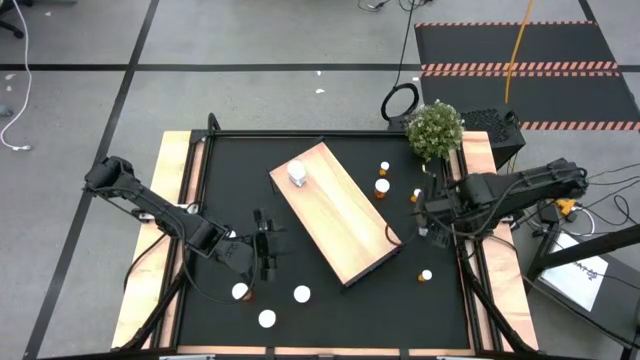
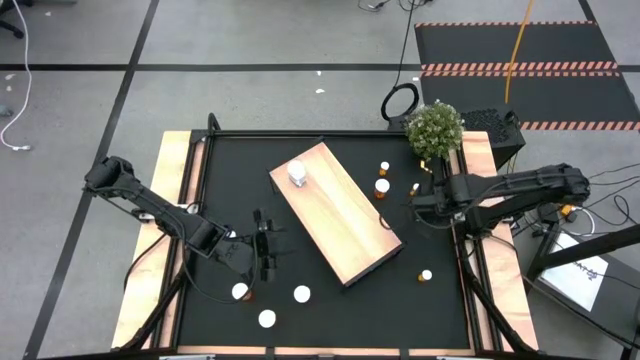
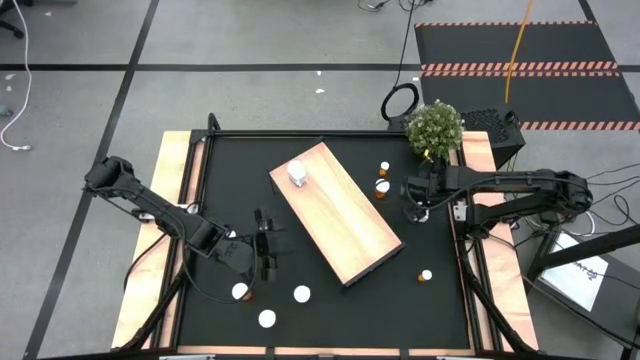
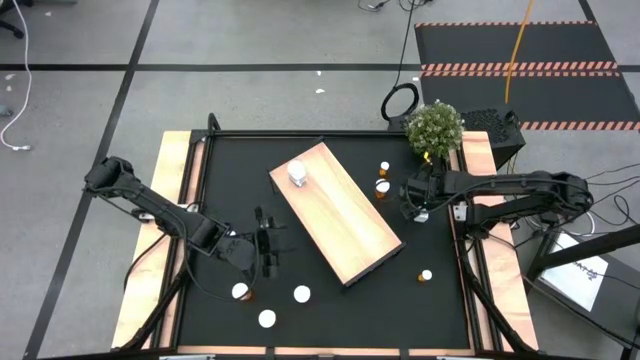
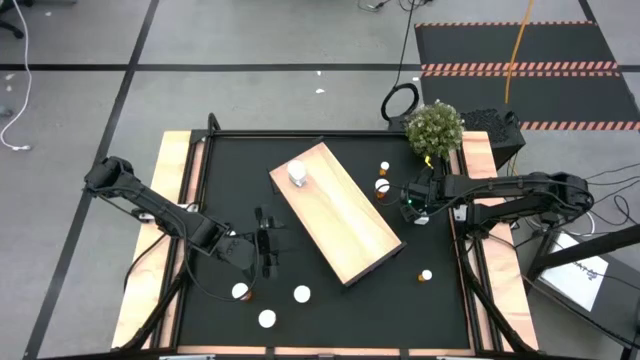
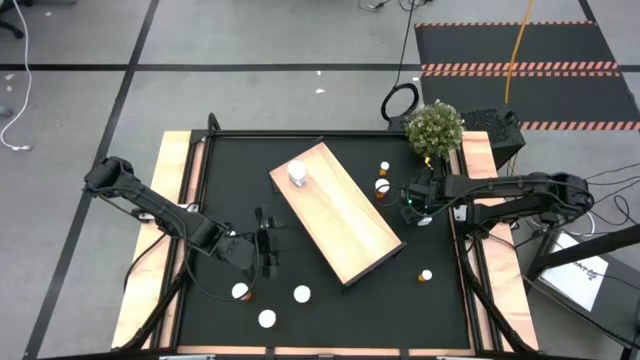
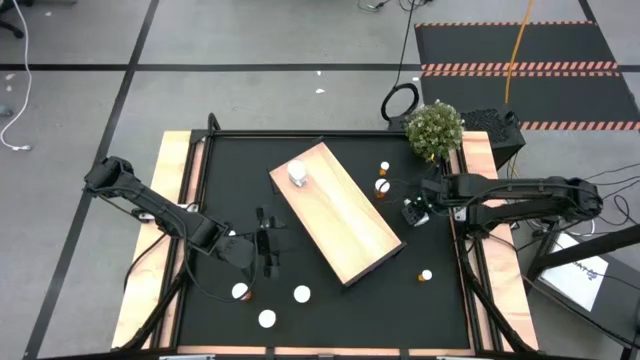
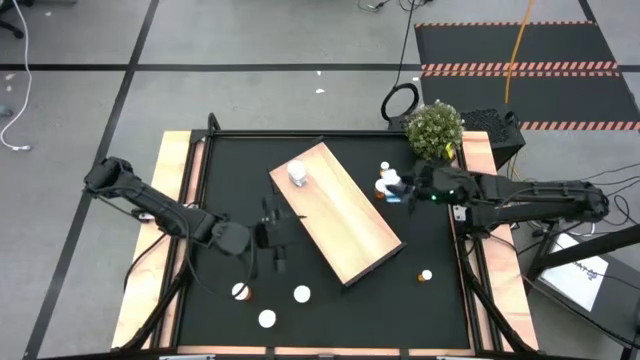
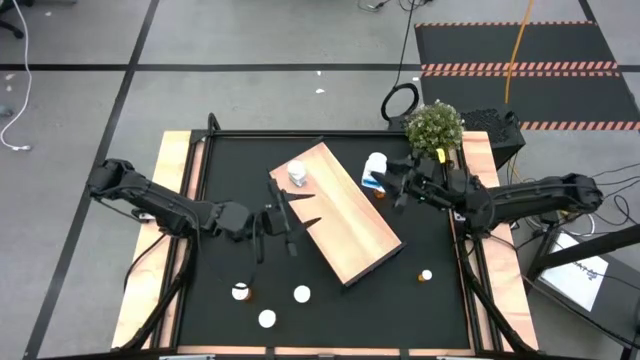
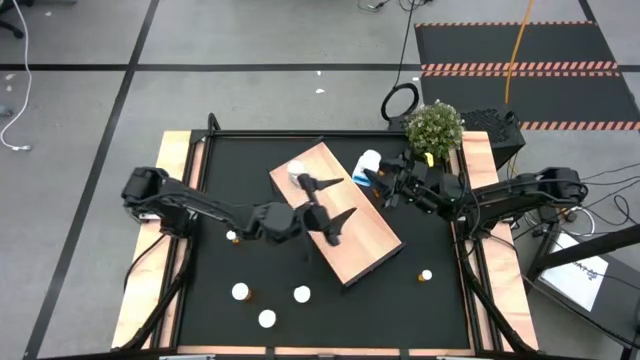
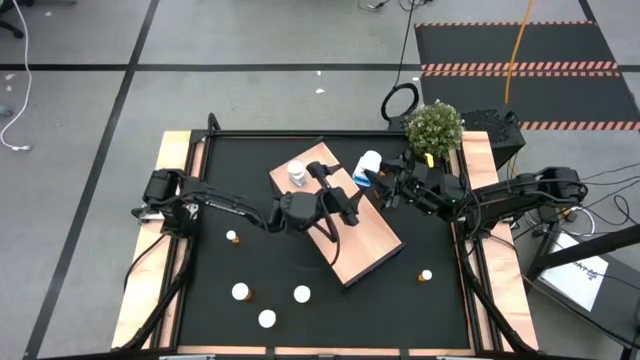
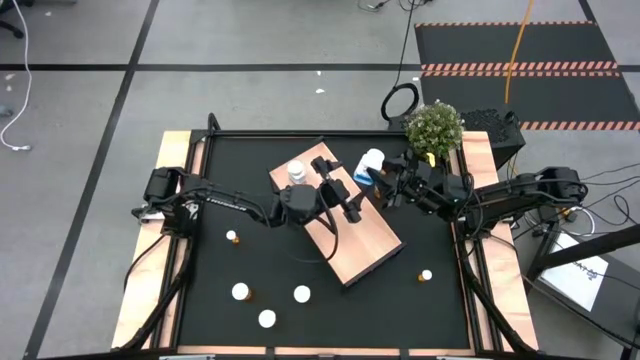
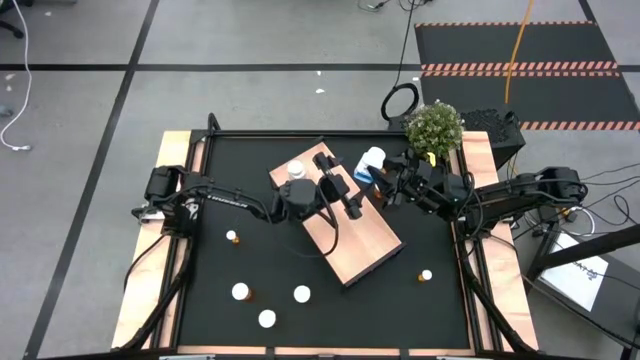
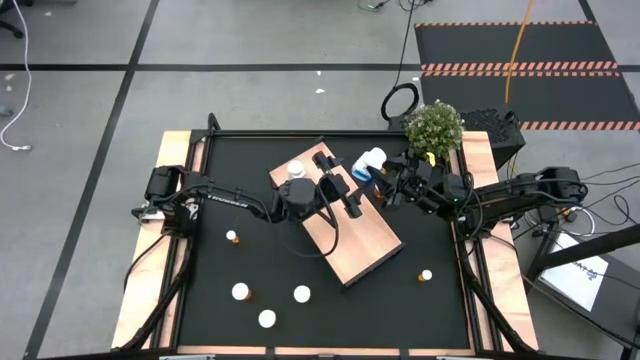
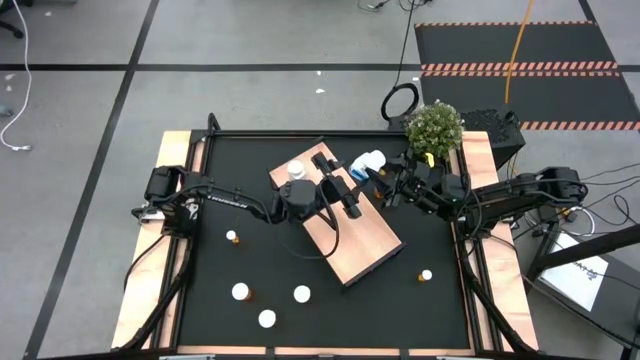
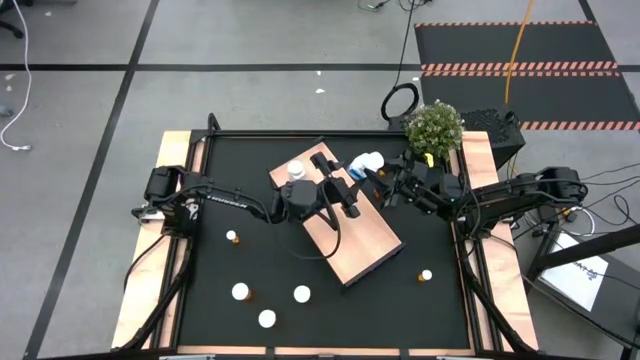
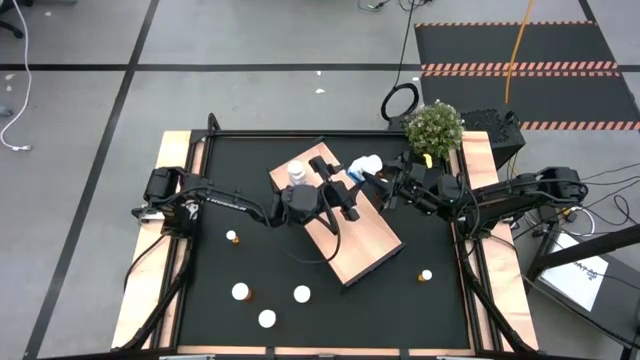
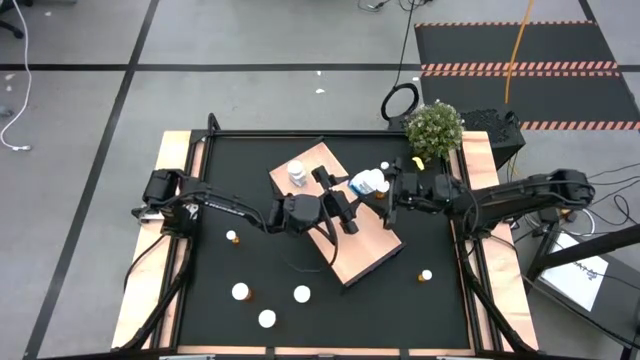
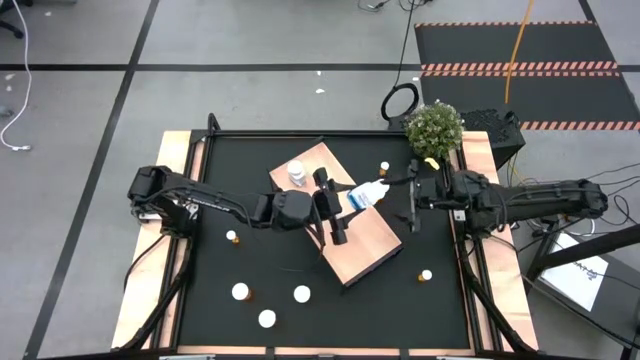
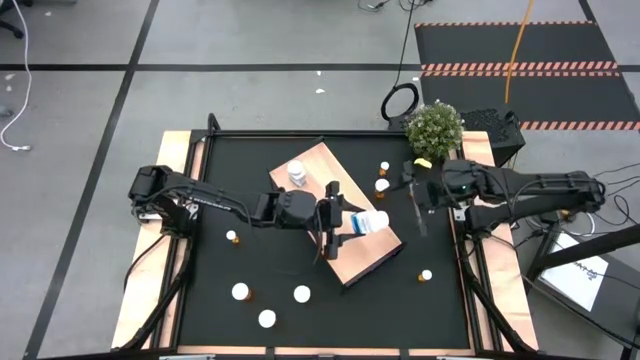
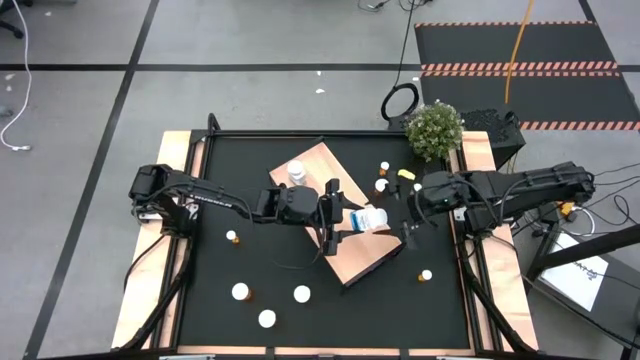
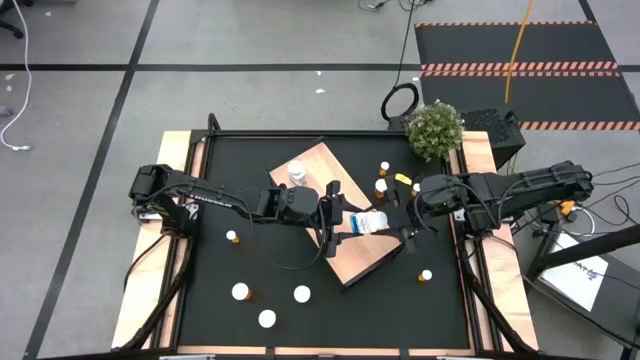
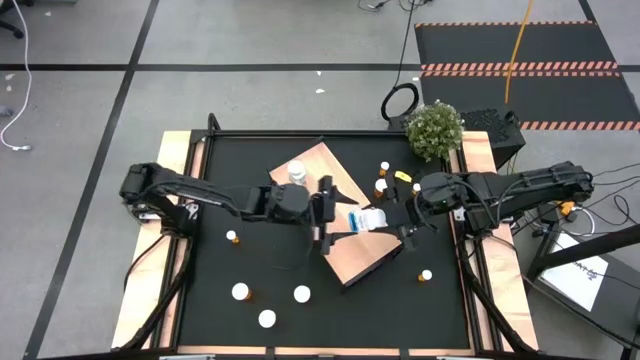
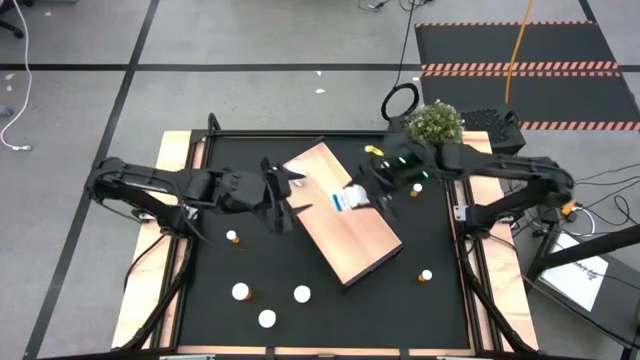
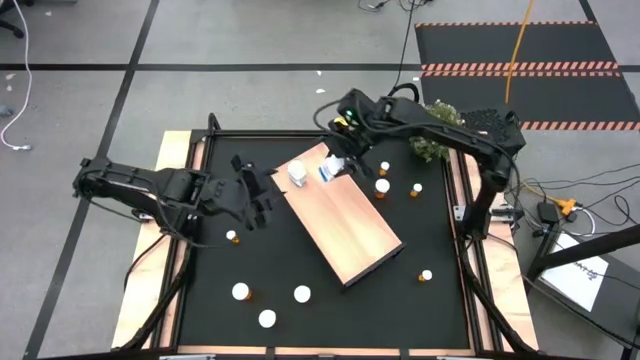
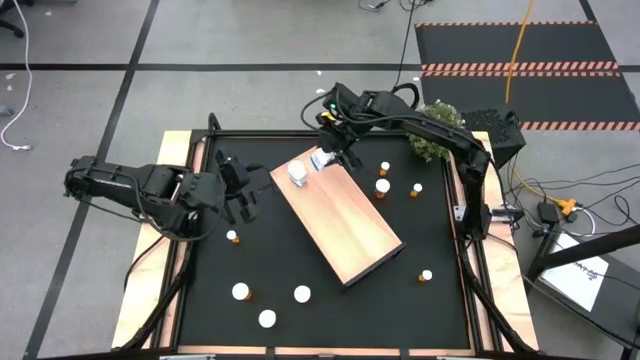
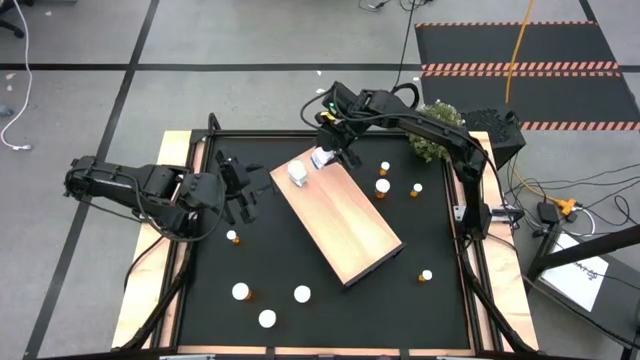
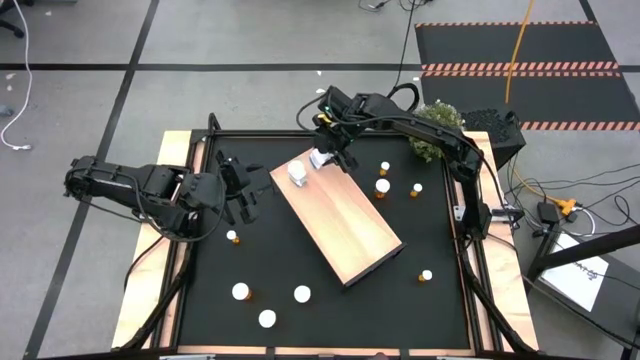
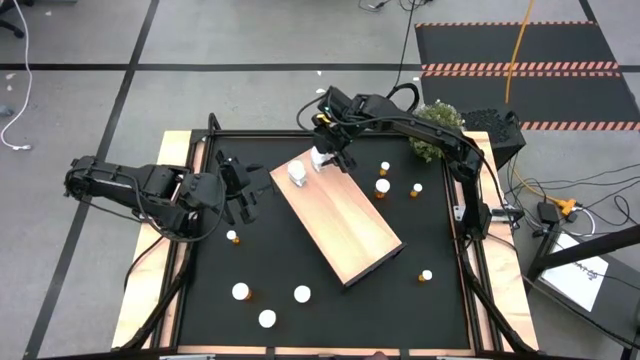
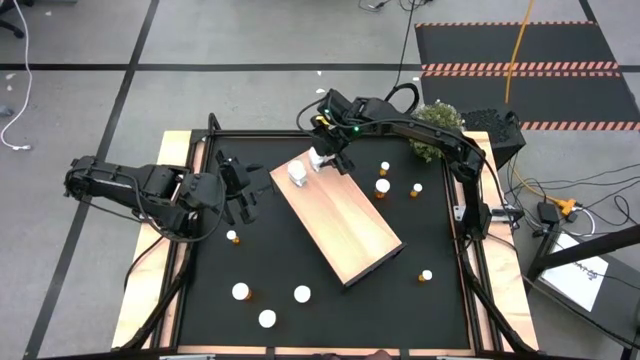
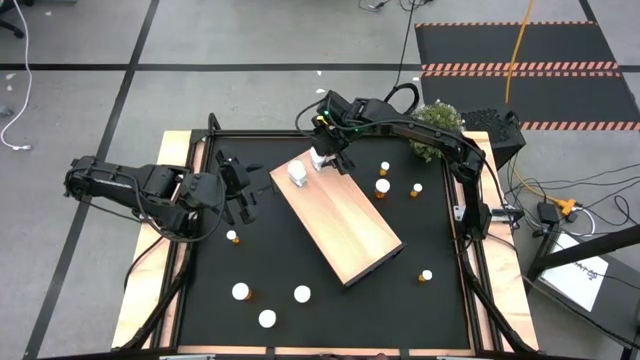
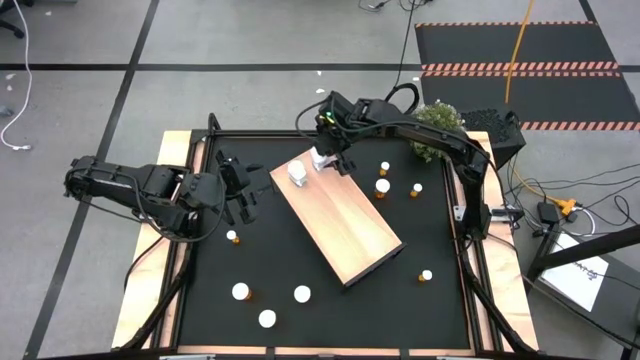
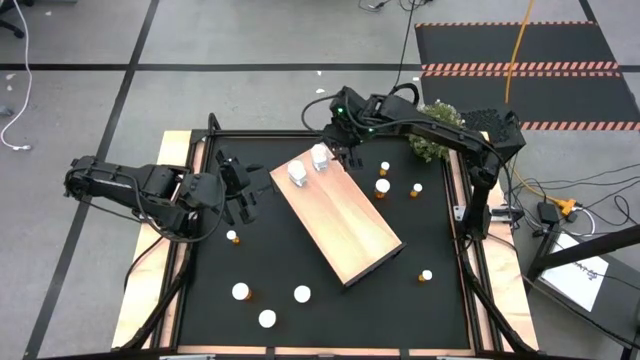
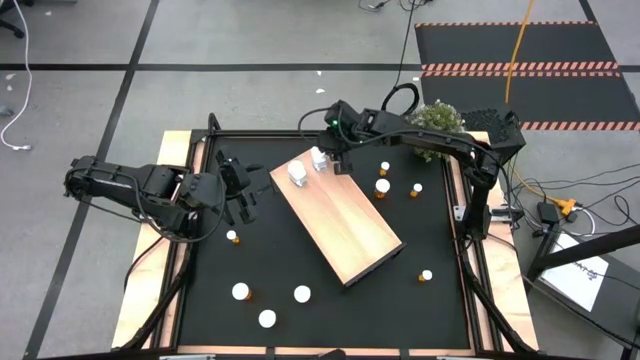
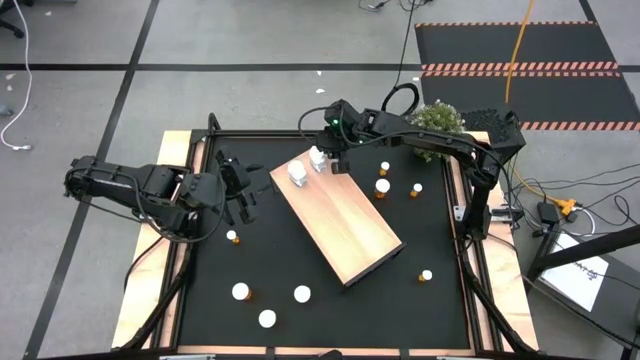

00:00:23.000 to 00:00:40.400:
Task: Pick and place medicine bottles onto shelf by color
Put the top white pill bottle on the shelf aligned with the other white pill bottle

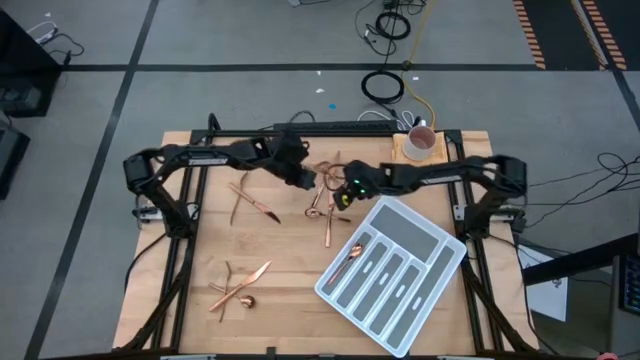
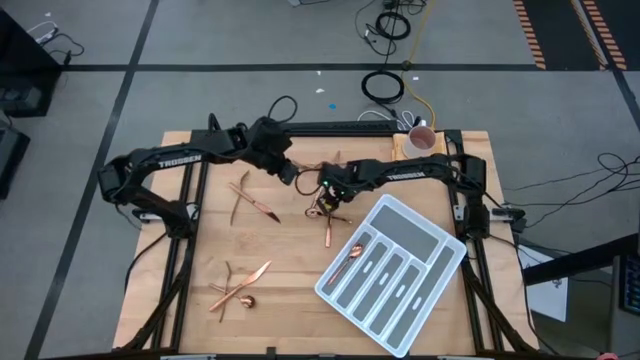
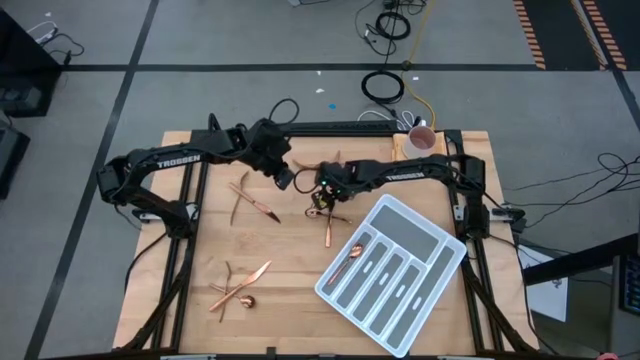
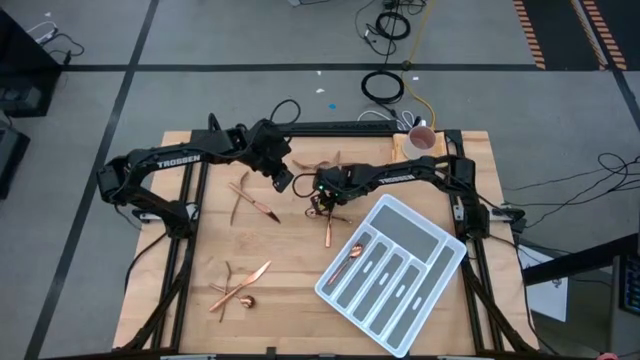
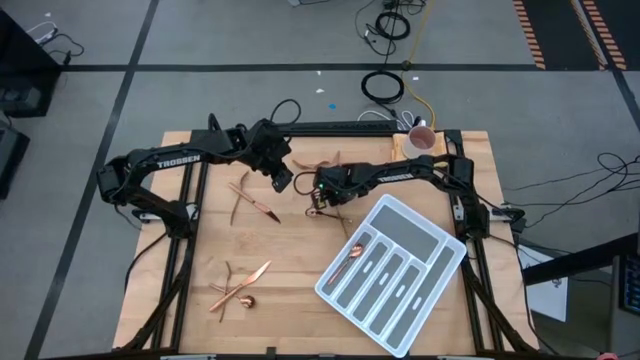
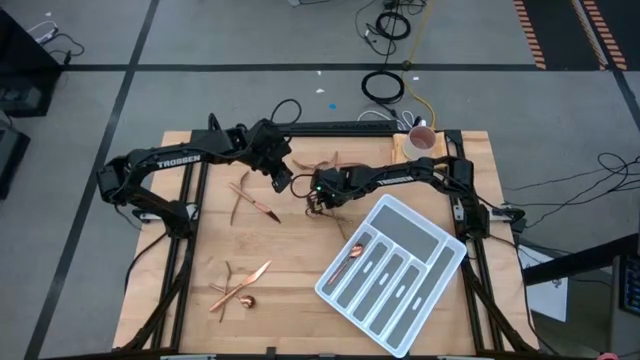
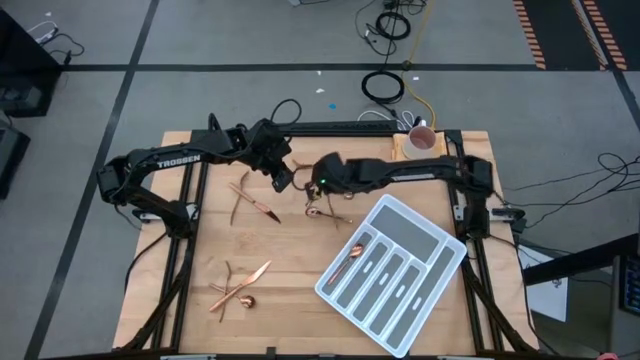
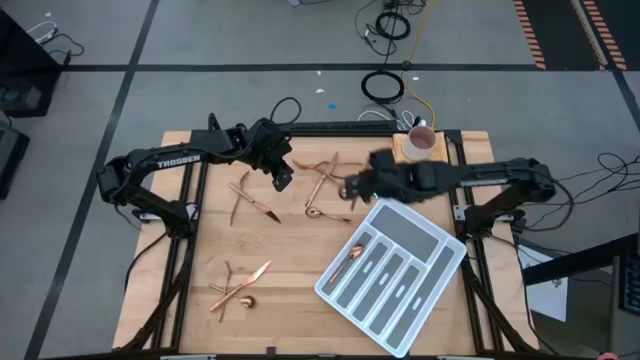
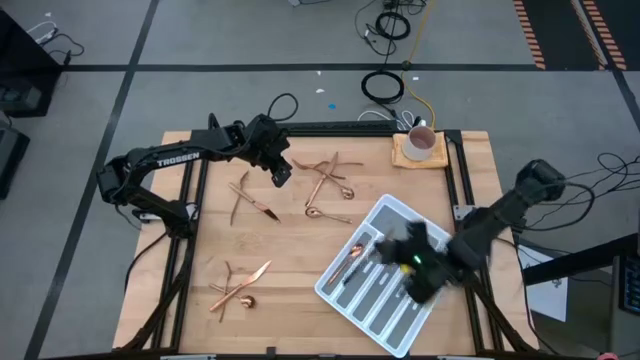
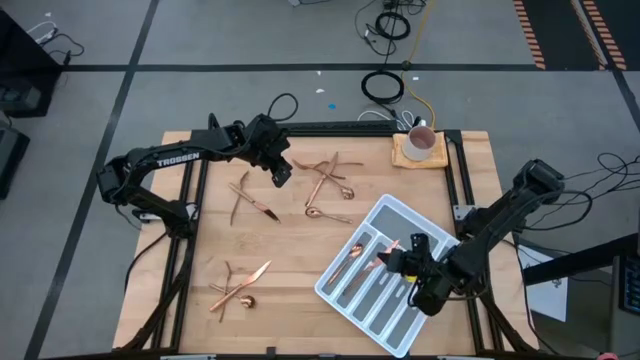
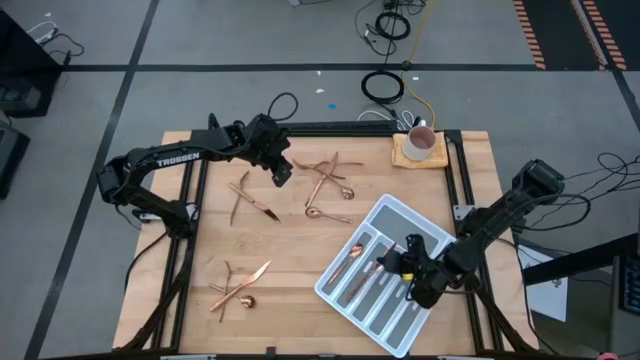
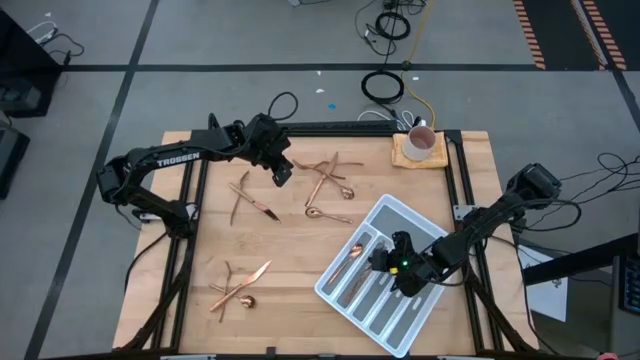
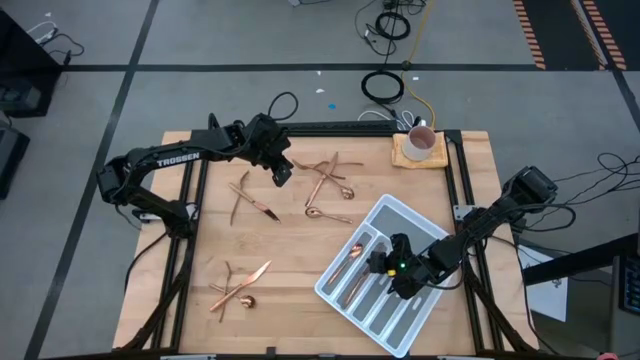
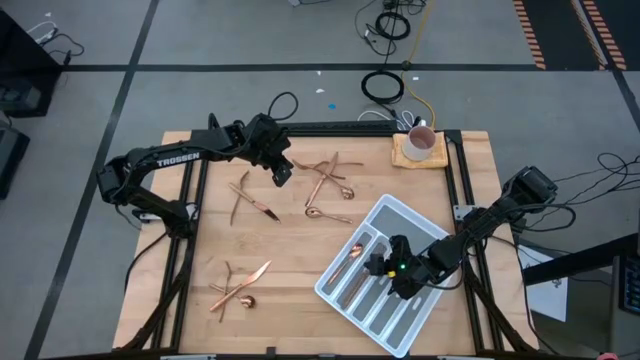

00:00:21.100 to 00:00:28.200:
Task: Sort silverware
Put the gold table knife into the cutlery tray
